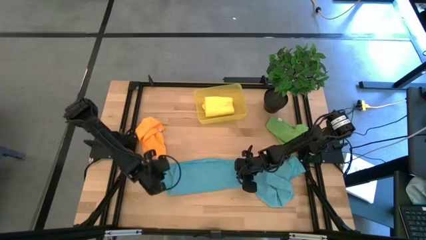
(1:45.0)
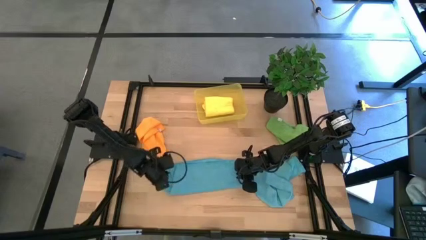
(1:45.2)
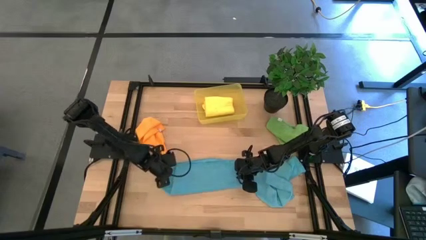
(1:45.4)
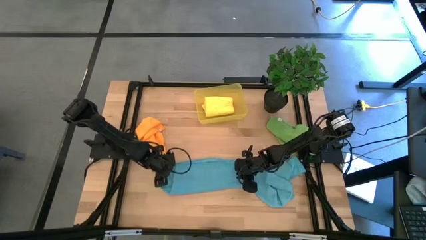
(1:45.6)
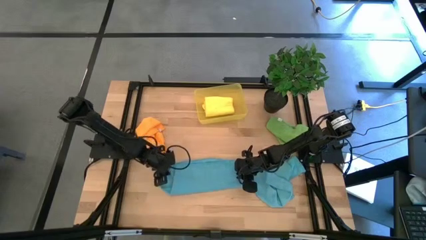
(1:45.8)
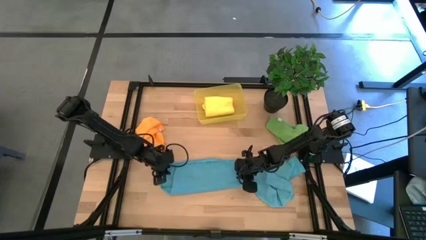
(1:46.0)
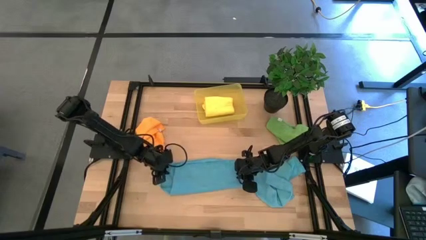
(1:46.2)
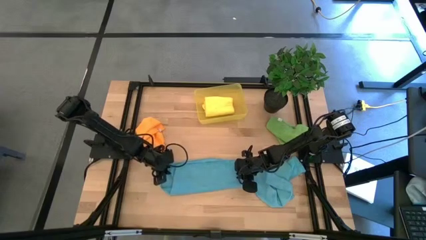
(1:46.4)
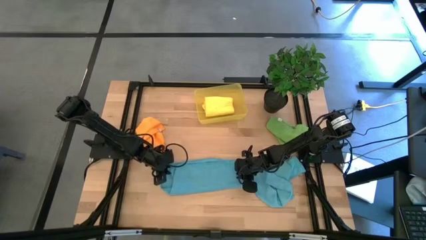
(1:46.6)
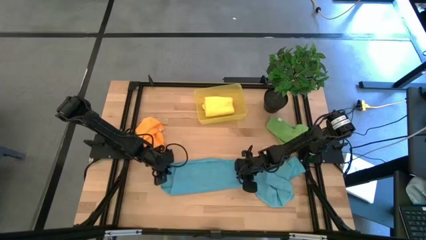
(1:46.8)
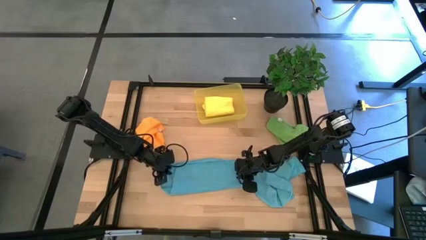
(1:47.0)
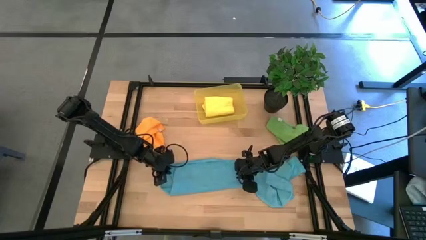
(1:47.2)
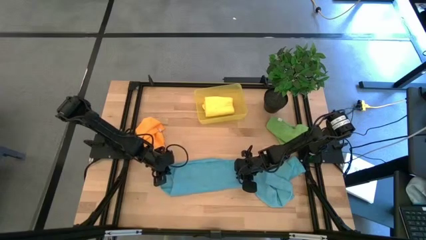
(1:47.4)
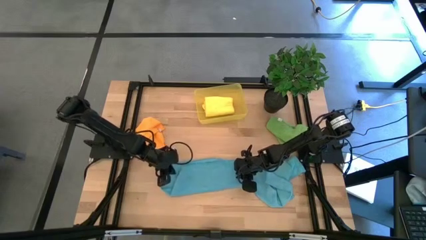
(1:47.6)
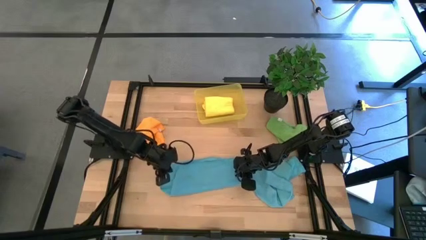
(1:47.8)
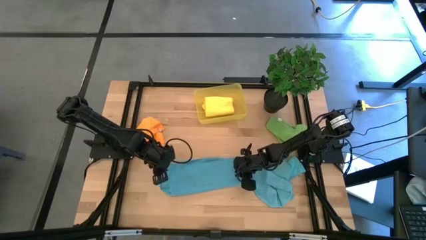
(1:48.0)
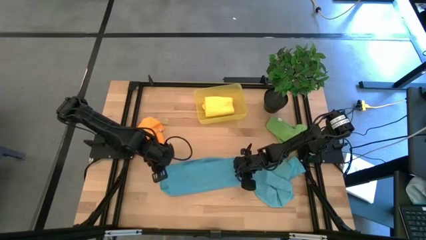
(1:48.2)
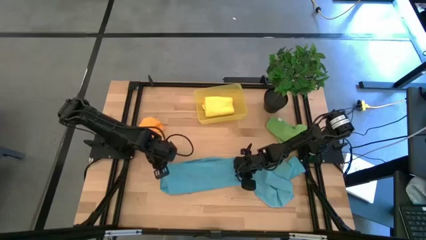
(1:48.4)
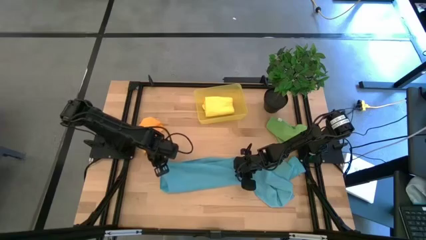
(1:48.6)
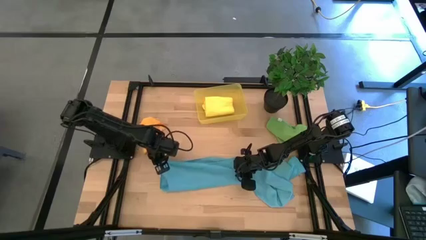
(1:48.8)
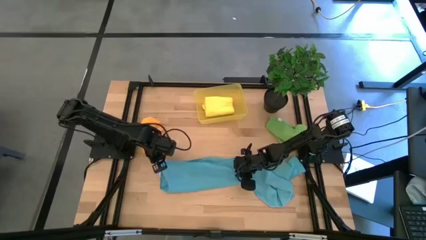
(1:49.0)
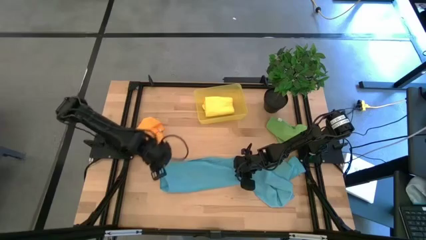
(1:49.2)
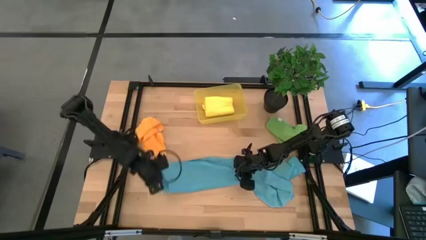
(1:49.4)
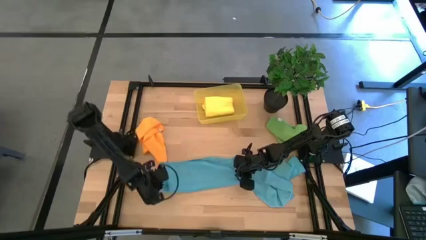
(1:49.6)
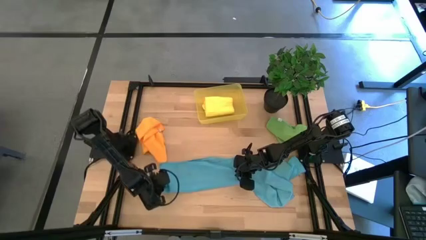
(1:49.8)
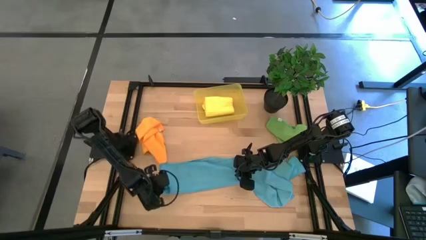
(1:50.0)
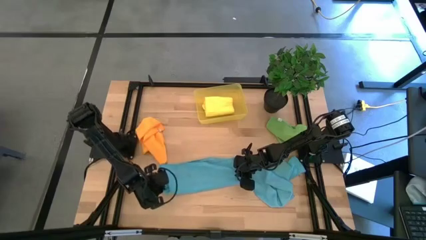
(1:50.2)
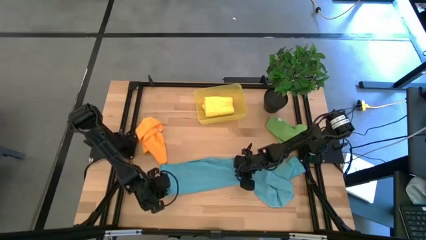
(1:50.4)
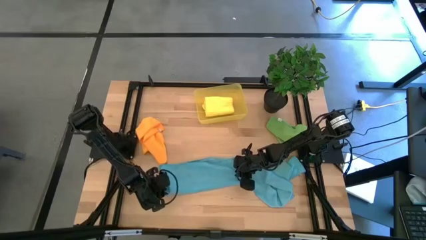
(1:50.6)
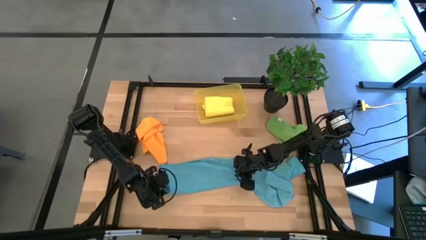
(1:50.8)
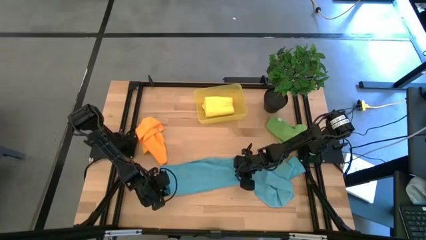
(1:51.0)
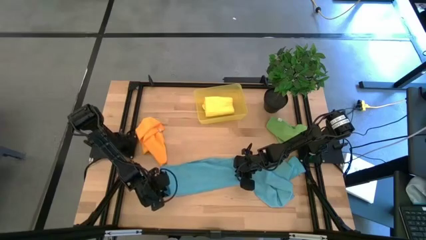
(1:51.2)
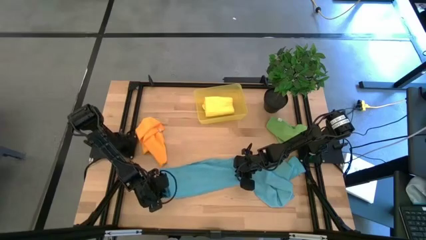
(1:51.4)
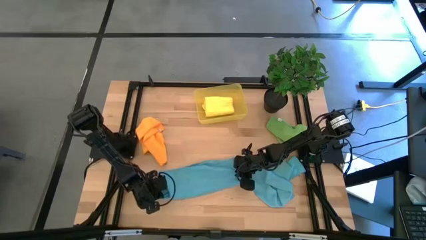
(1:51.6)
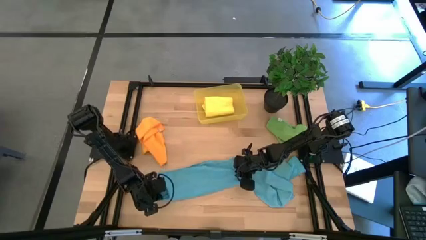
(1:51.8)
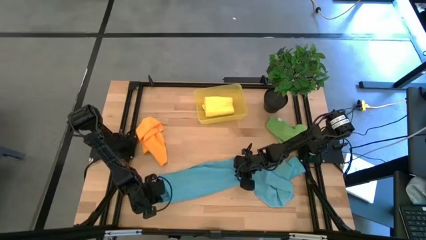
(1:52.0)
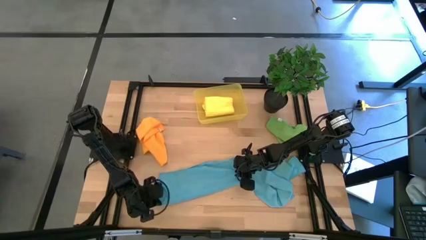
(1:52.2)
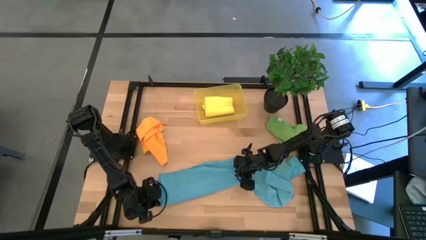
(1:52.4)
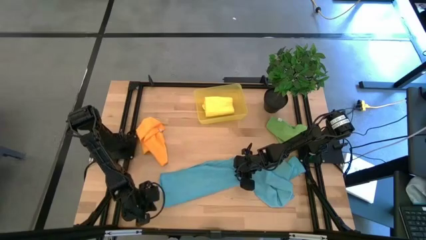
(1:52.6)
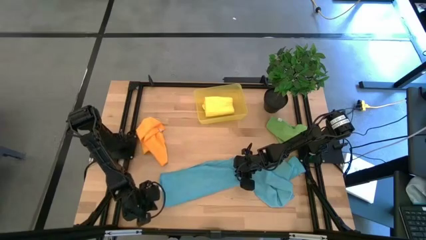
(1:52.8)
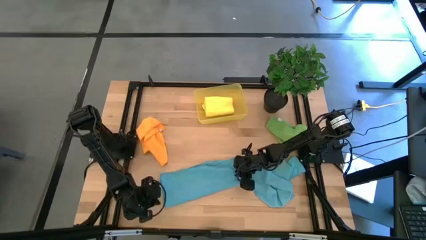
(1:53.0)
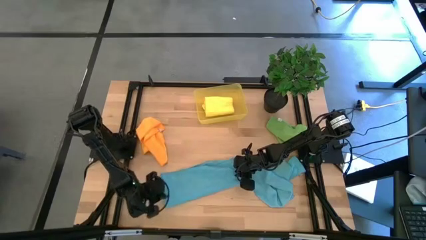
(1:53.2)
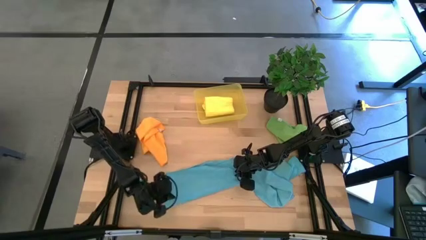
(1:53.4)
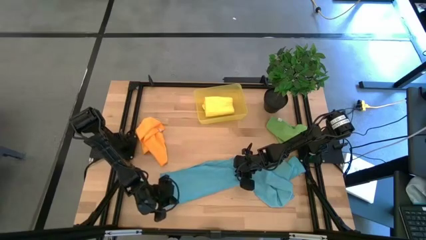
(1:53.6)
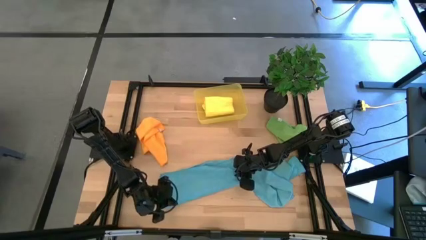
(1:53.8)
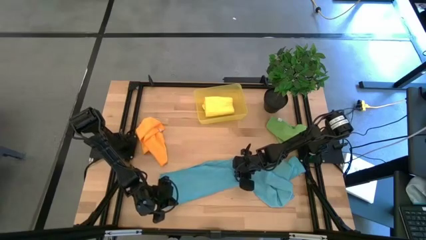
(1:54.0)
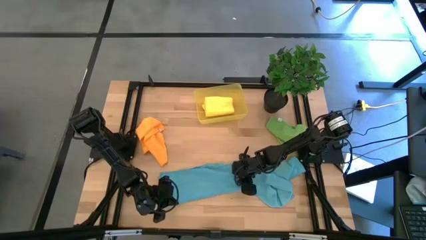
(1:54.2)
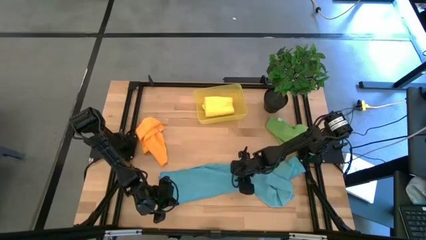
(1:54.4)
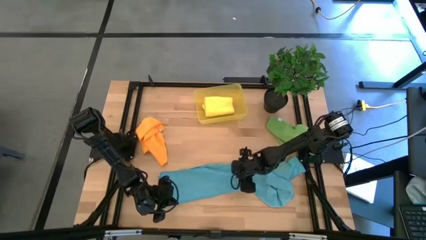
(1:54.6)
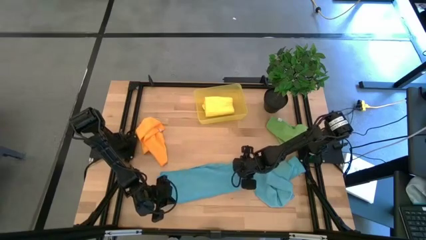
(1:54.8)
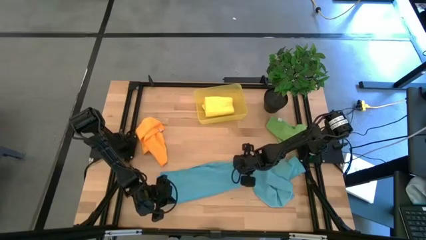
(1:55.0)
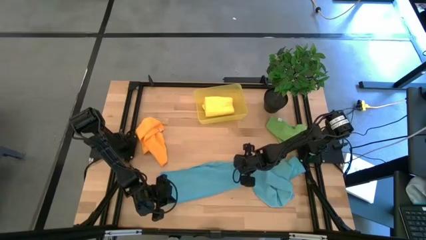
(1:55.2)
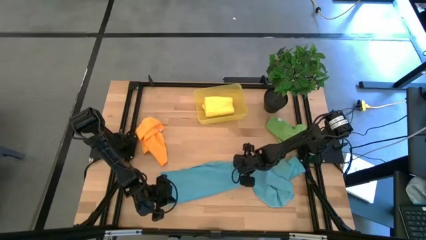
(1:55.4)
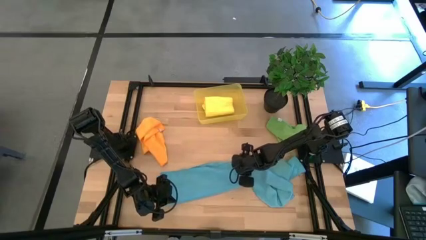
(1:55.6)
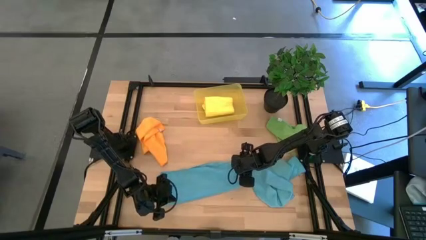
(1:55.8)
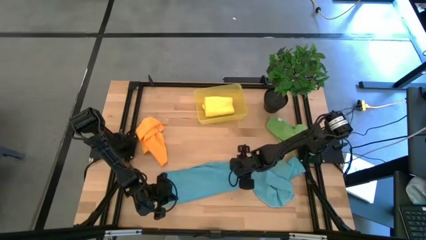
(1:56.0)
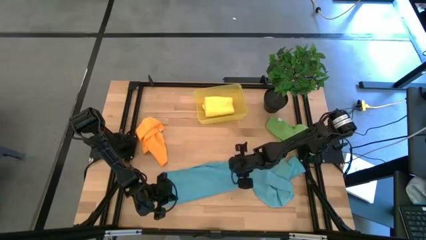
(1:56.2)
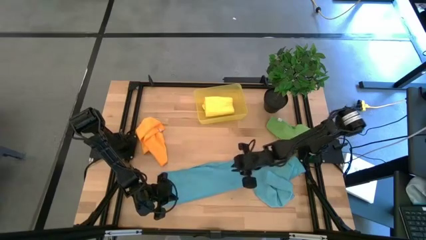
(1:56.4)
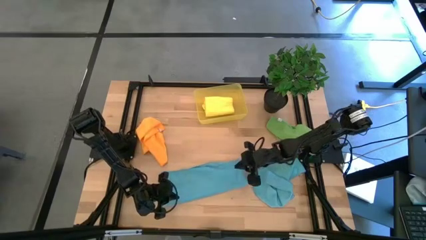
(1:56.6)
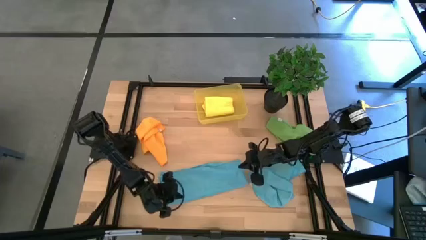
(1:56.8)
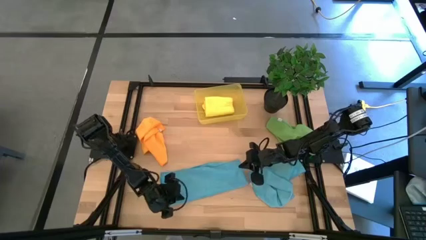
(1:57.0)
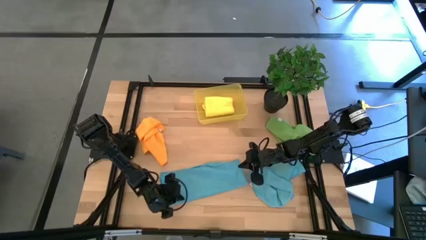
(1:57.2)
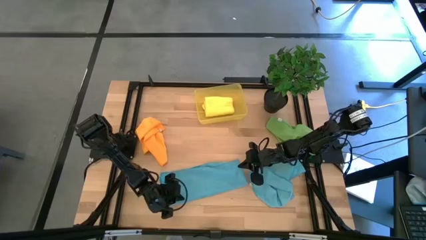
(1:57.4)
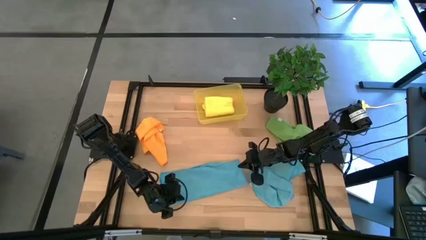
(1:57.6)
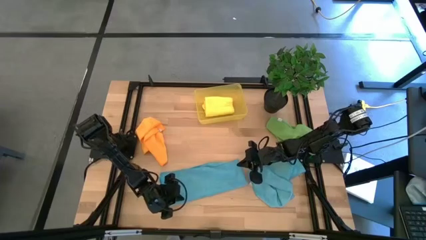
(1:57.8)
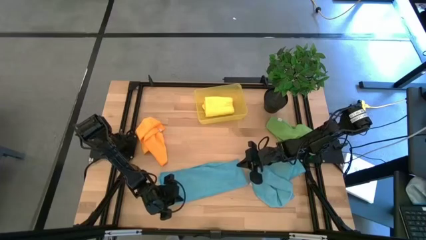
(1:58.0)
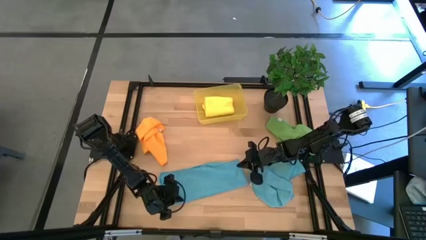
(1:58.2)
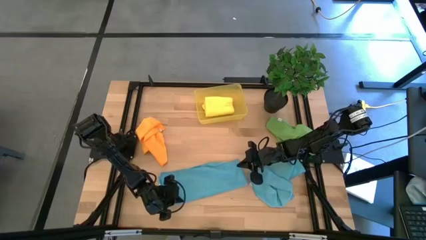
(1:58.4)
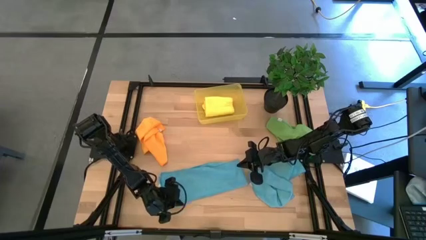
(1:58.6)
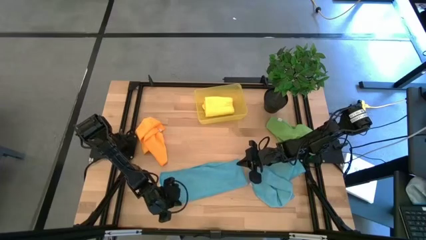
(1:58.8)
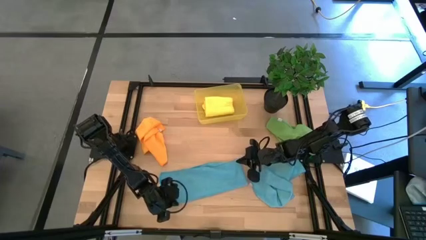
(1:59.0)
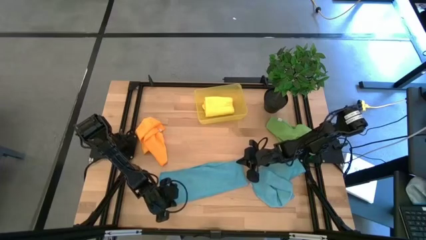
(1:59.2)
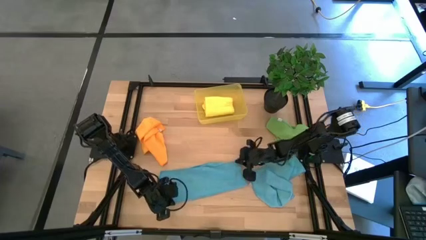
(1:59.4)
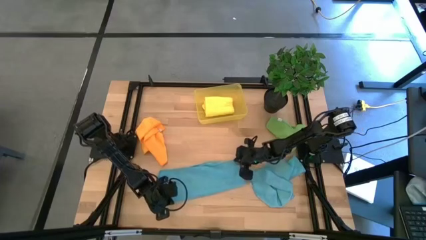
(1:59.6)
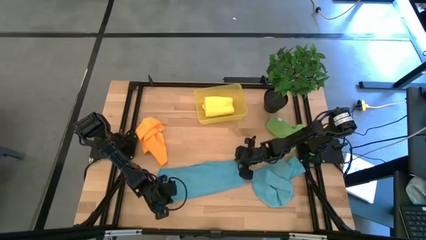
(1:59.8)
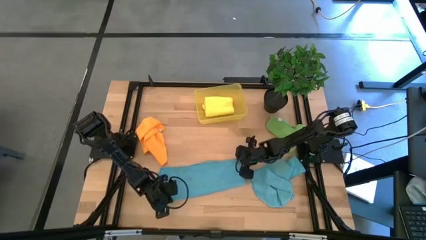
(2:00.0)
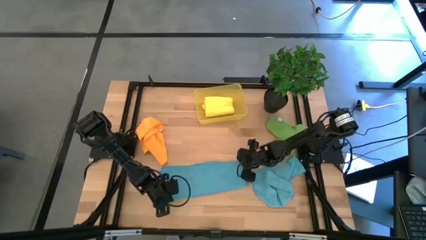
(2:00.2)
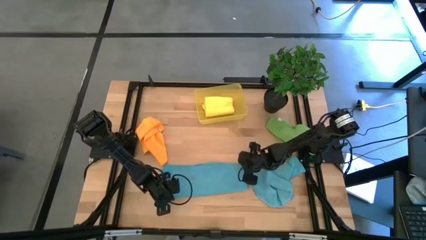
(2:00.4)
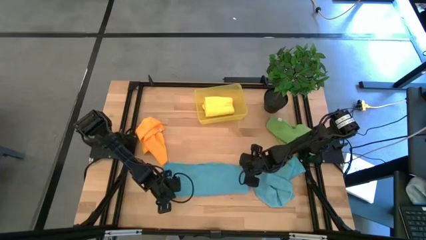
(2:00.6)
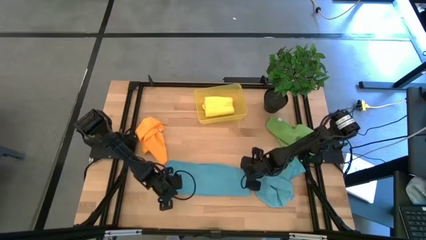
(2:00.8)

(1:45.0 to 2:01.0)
Task: Fold microfiber towels
Fold the left blue microfiber towel
